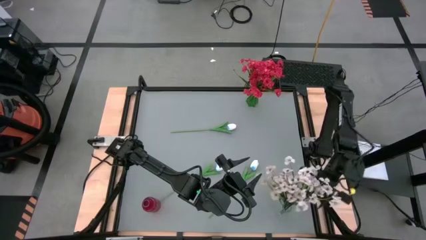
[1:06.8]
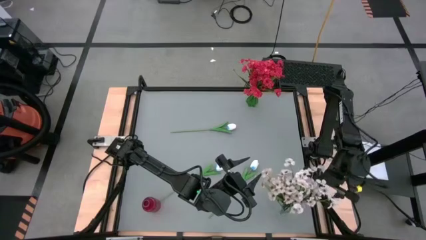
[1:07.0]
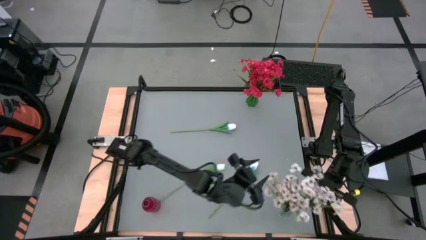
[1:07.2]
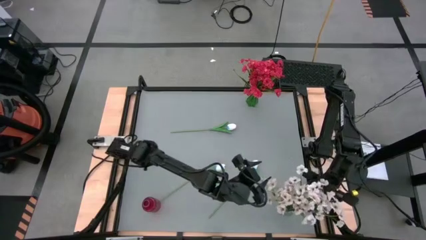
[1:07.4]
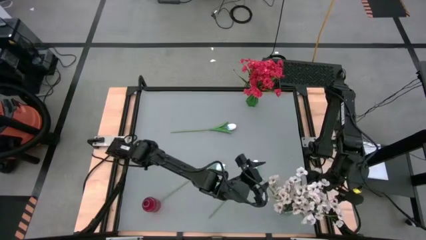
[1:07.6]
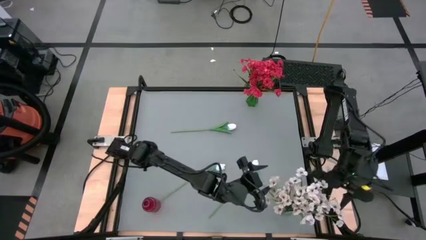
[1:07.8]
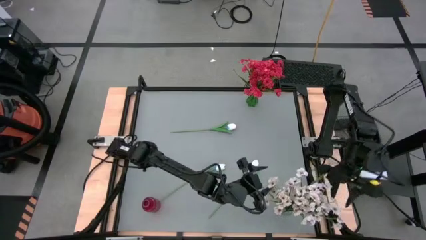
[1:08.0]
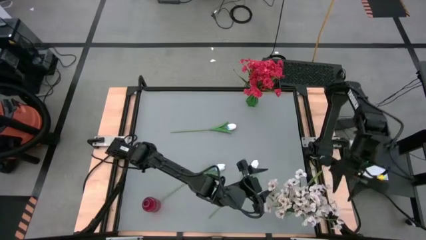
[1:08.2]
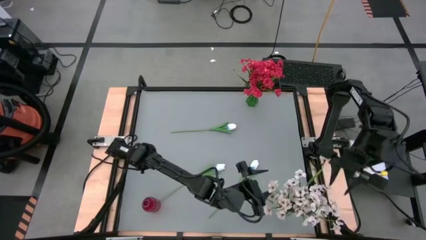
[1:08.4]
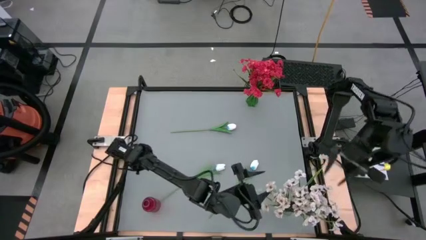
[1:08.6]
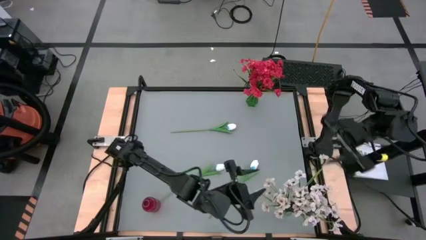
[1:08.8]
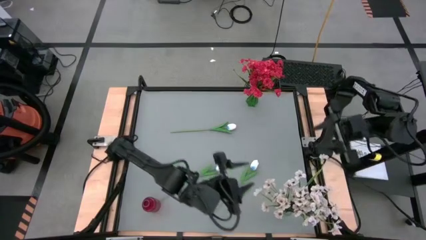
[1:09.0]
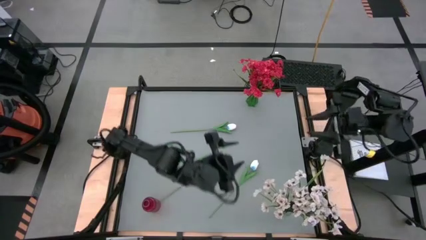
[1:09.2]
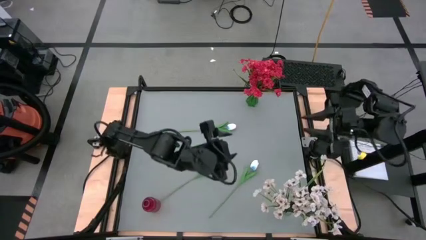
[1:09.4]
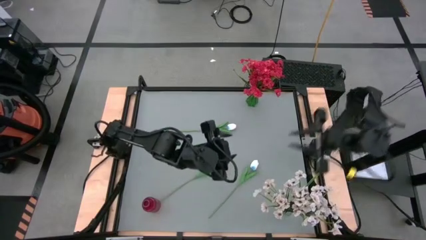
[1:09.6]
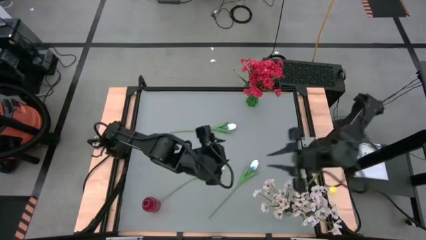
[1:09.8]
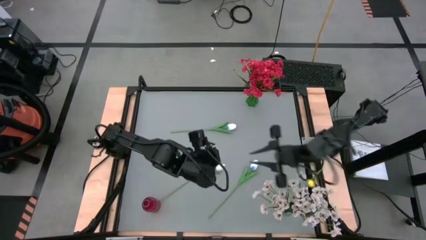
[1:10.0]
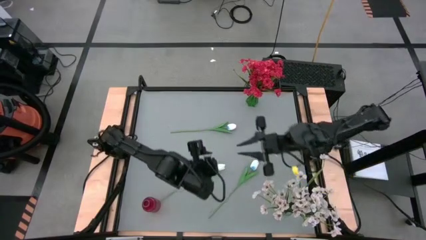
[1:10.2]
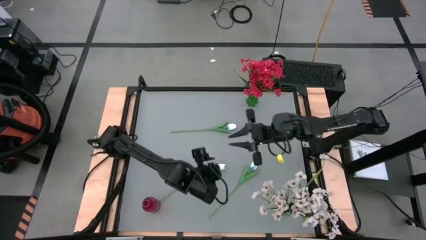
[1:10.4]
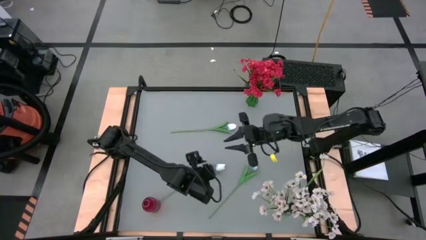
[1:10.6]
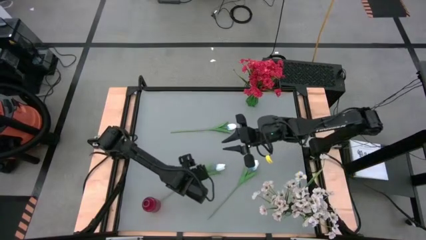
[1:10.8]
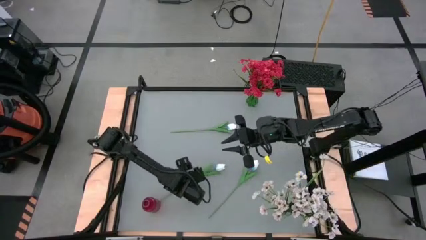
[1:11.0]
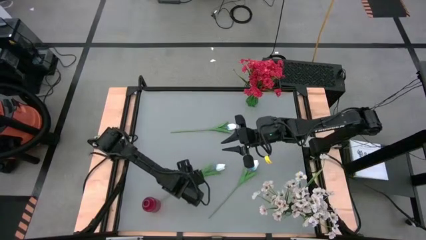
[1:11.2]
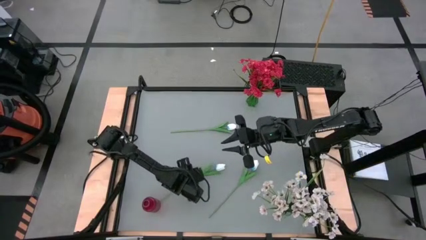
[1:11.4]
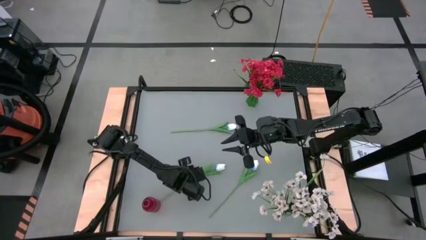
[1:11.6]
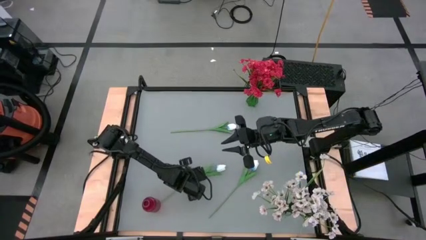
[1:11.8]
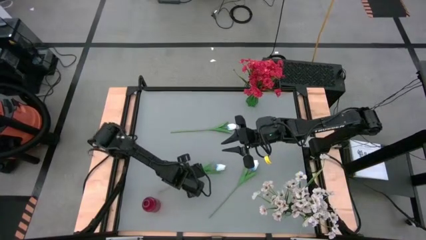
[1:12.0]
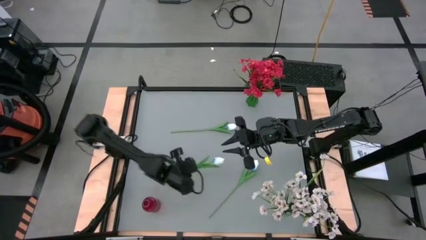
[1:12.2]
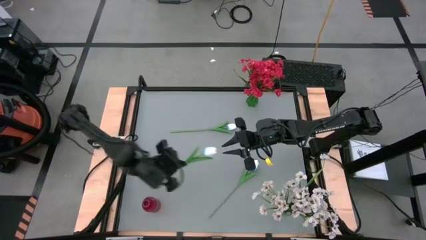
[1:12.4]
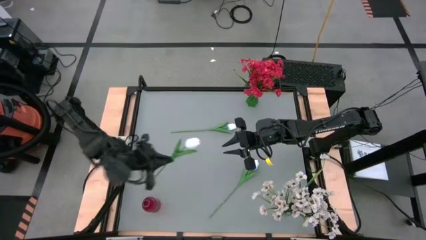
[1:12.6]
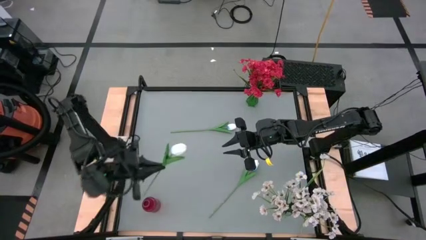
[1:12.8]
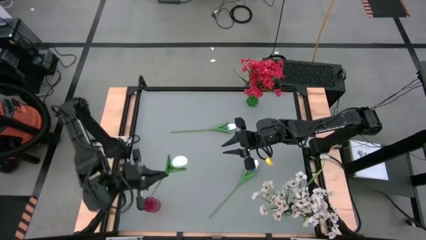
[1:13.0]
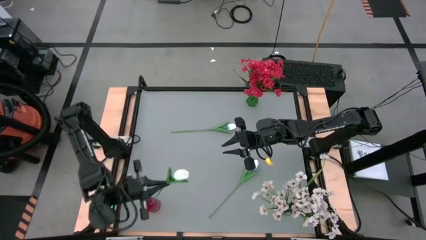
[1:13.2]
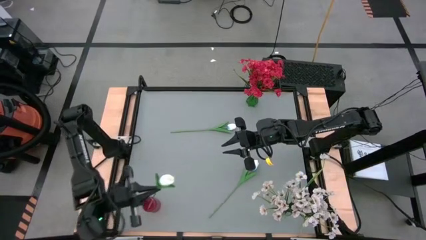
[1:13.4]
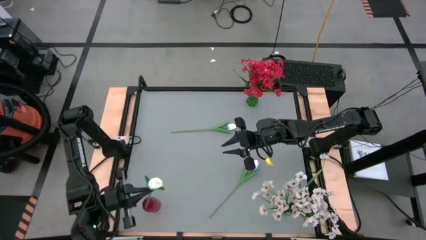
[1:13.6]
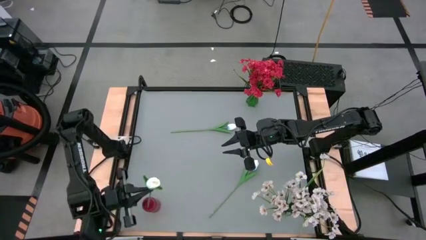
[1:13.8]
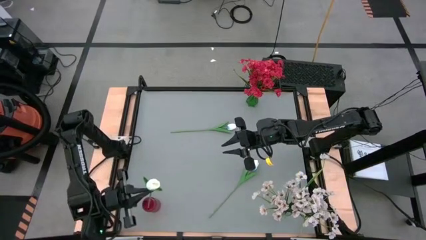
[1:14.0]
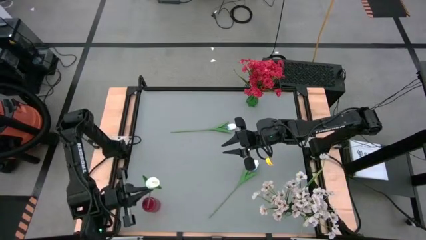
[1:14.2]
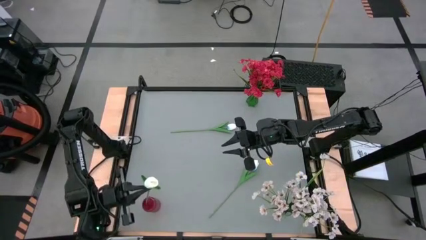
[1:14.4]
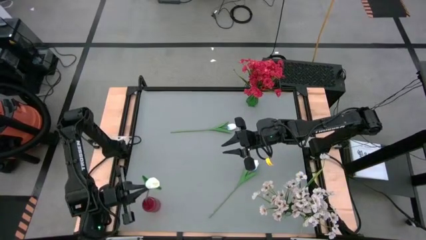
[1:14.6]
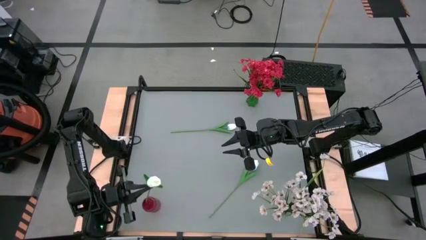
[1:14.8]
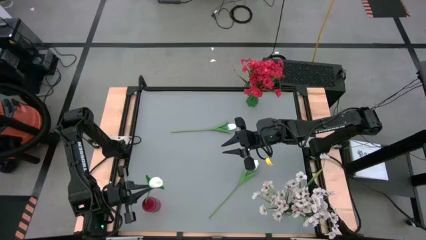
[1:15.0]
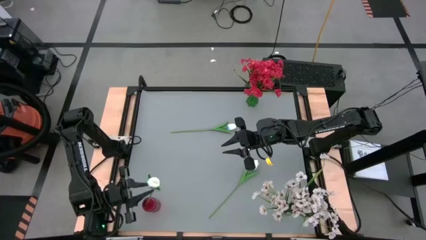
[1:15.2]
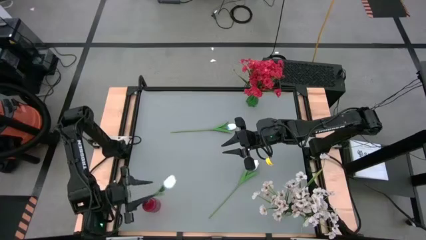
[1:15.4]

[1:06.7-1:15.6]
Task: Sort flowers into vase by color
Put the bottom left white tulip flower into the red vase

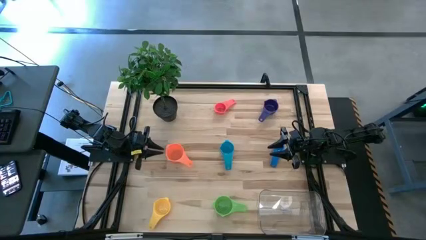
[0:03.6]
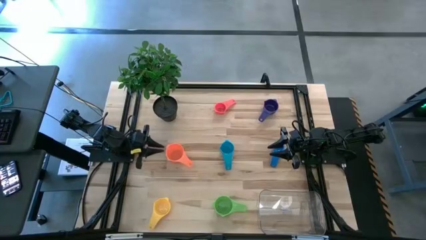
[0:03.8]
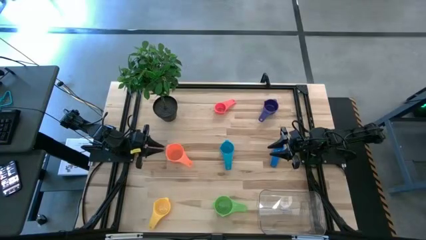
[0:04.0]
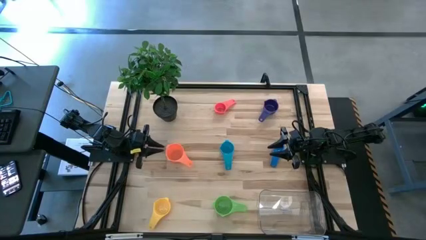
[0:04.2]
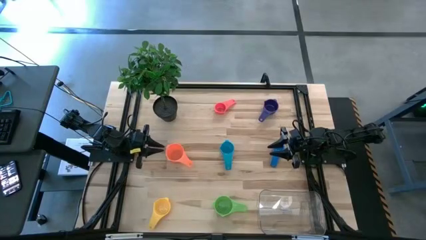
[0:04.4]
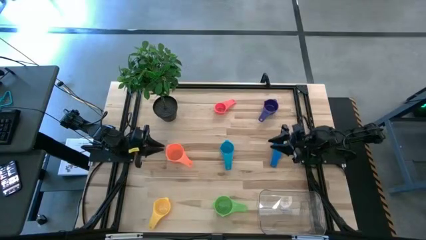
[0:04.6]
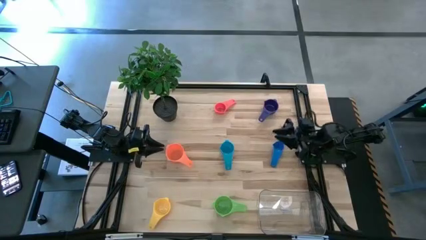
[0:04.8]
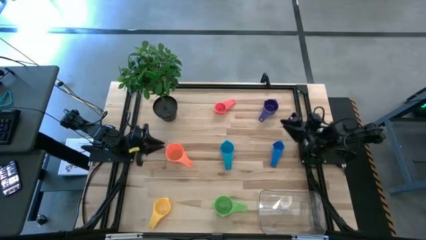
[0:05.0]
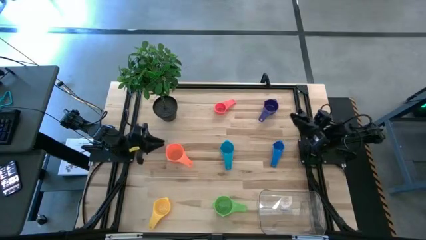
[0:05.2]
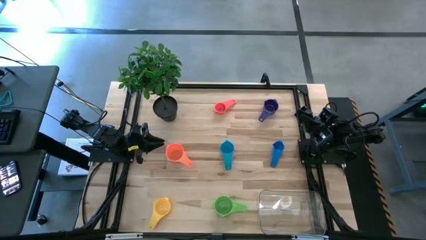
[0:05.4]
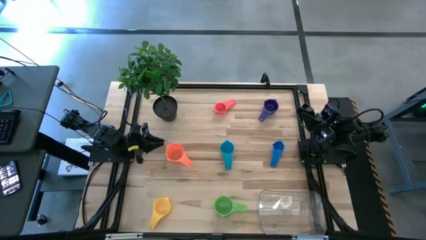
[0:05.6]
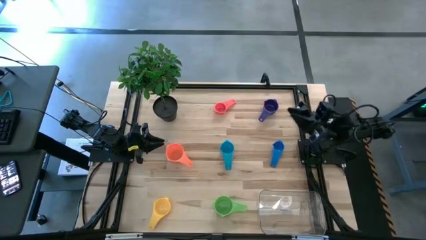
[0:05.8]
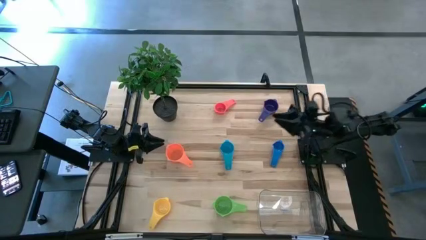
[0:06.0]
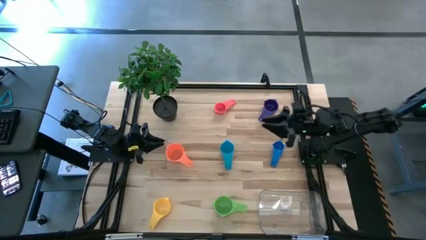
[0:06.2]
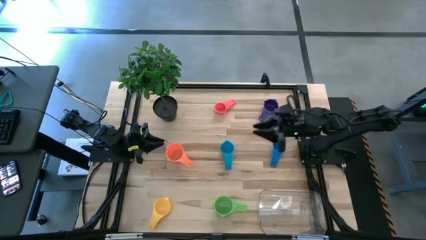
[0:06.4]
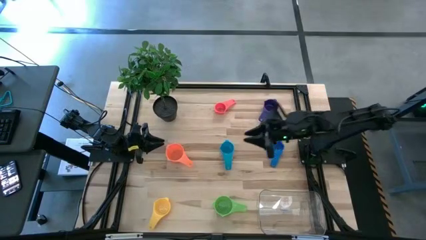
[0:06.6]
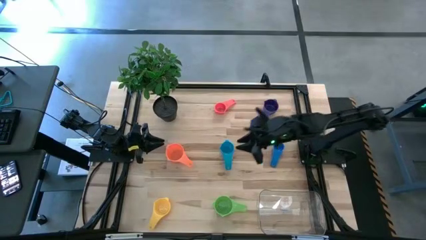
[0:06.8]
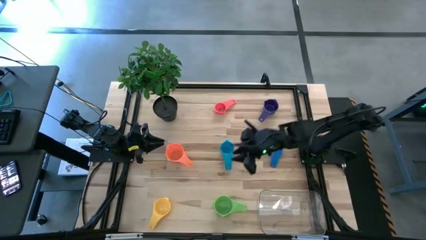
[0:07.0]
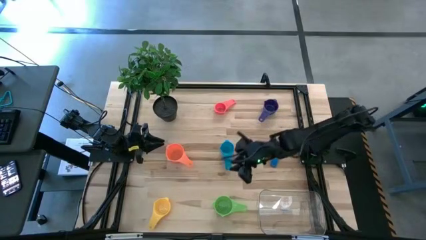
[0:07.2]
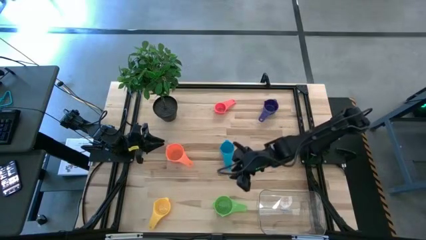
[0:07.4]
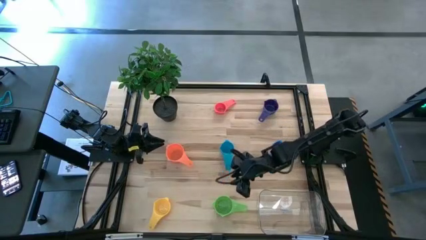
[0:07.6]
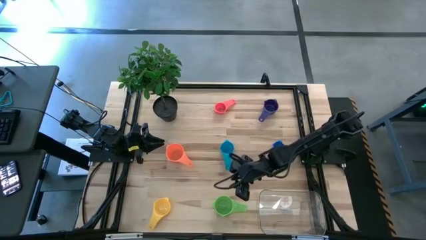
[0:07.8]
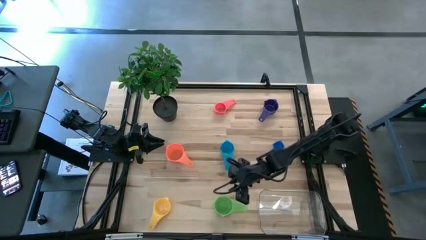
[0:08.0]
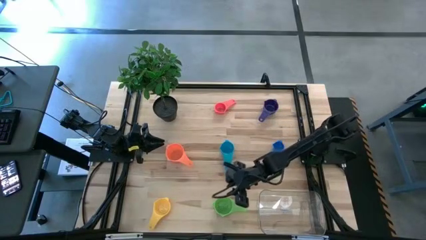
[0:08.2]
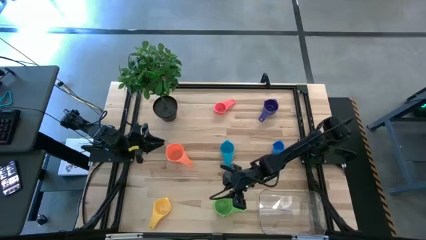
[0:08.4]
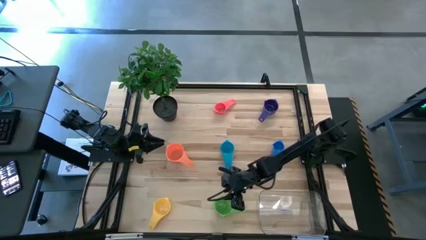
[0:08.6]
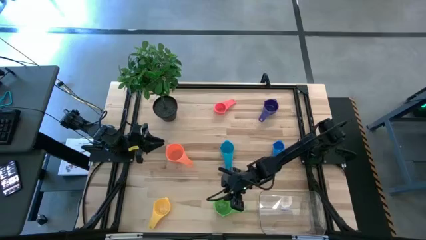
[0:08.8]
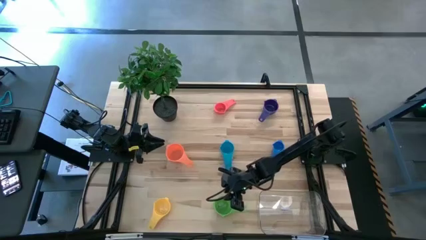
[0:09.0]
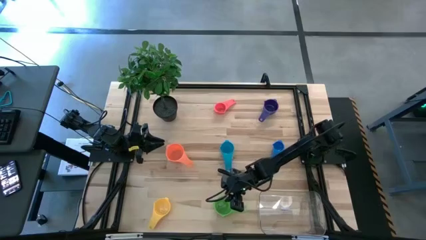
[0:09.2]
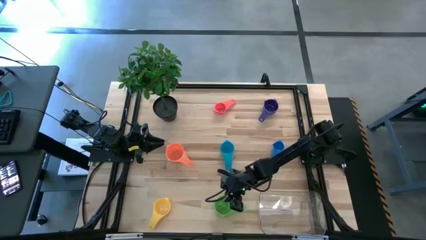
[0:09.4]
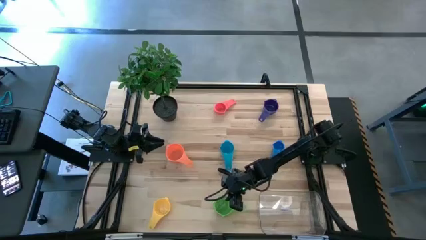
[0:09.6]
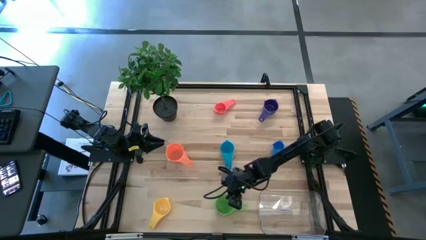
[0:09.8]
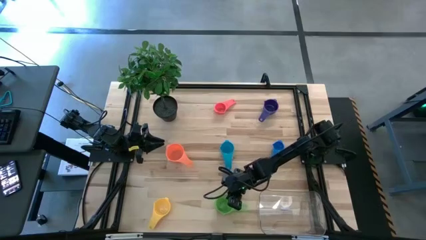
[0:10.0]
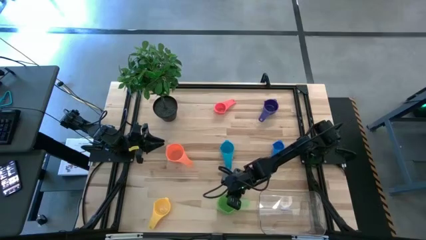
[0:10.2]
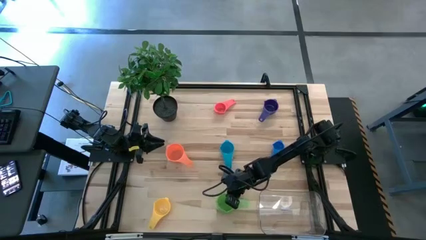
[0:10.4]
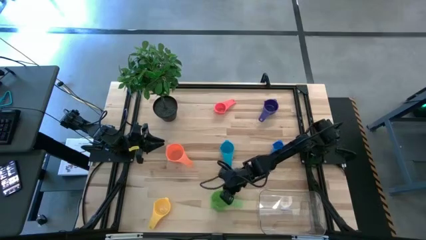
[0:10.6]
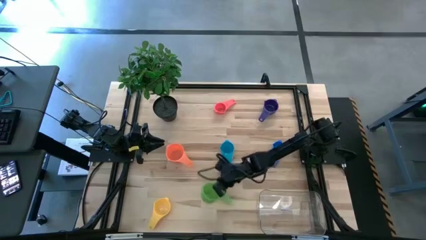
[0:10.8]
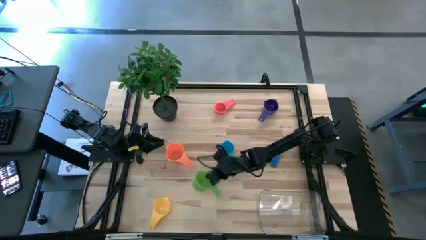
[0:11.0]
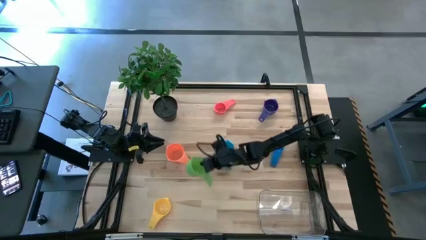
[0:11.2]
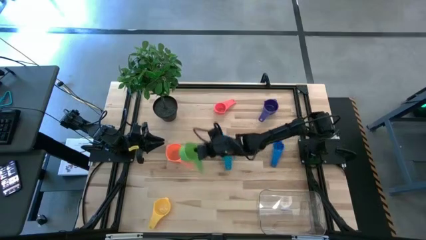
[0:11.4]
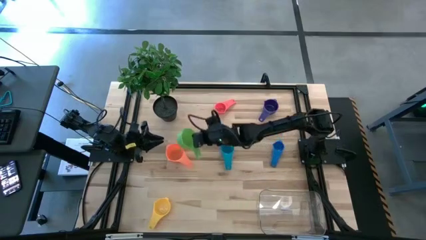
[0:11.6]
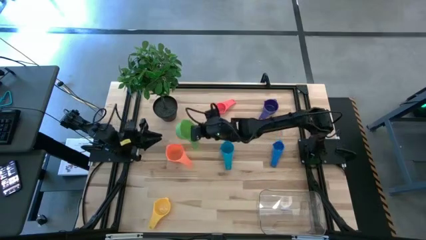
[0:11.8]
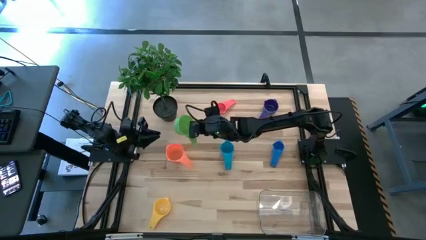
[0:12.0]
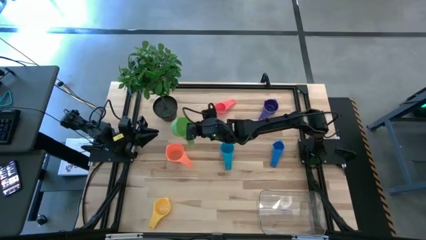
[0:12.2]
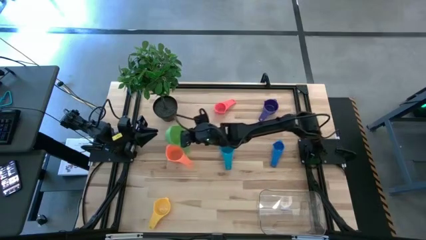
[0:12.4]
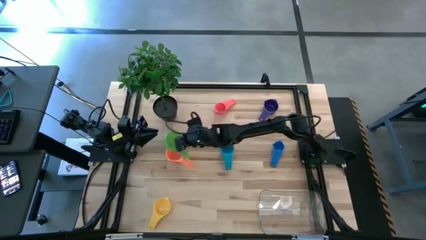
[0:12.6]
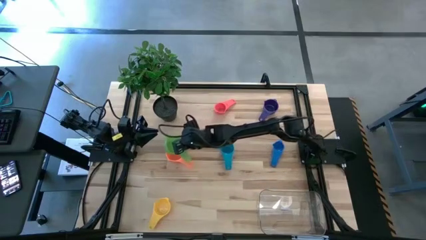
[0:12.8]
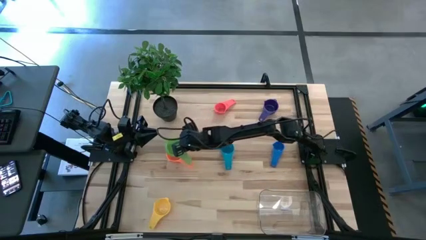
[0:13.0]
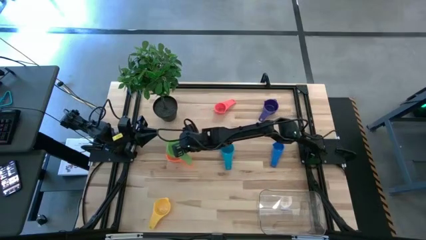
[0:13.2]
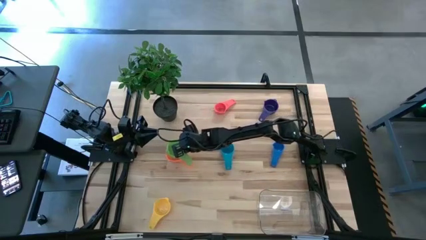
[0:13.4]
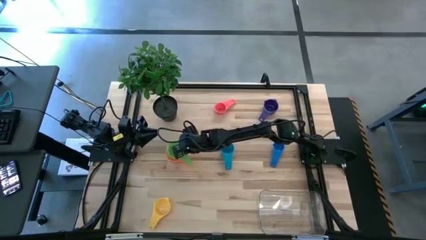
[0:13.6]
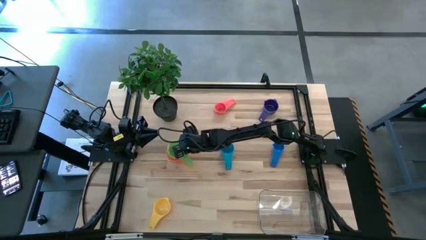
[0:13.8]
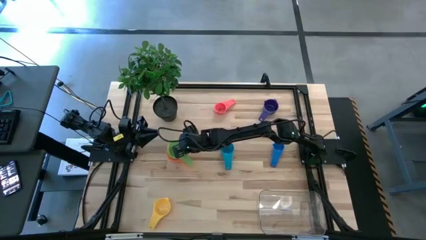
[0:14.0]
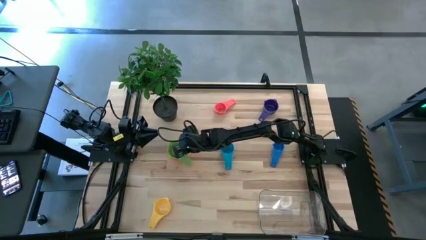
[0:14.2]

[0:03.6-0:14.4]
Task: Nest measuring cups in basket
Stack the green measuring cup on the orange measuring cup
